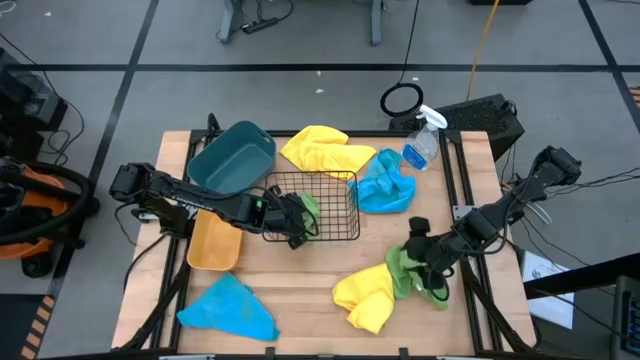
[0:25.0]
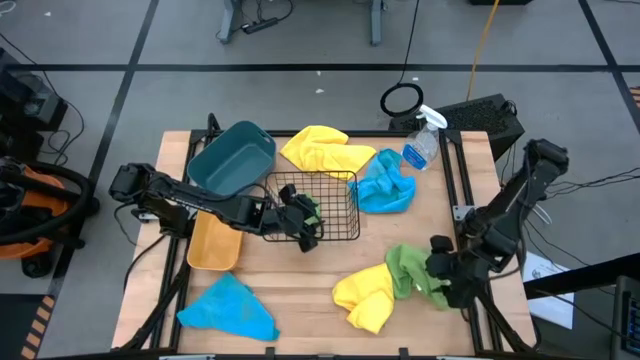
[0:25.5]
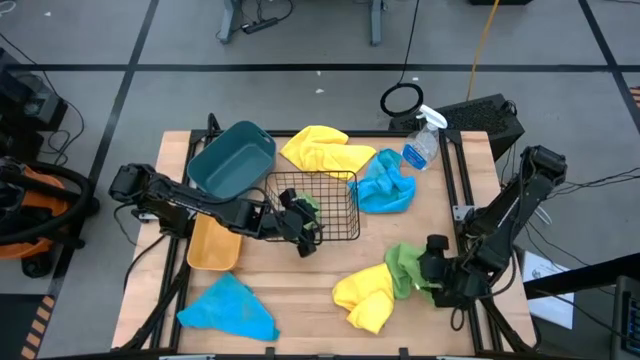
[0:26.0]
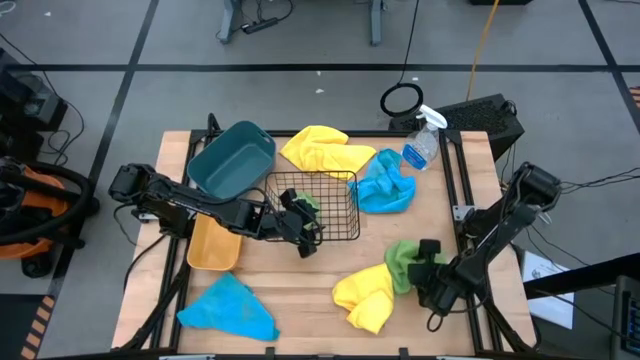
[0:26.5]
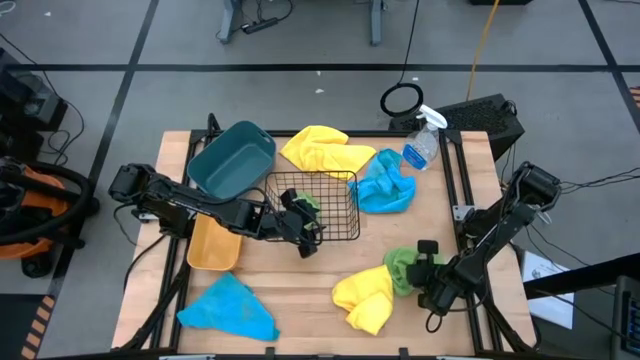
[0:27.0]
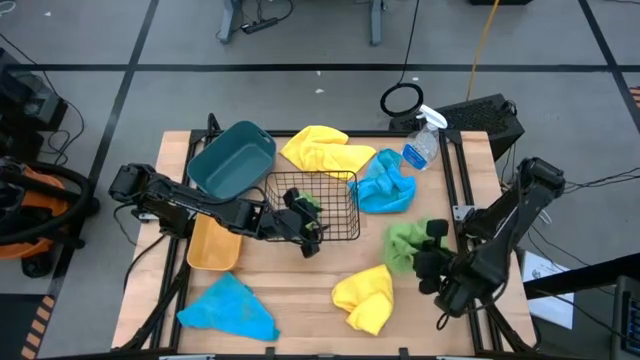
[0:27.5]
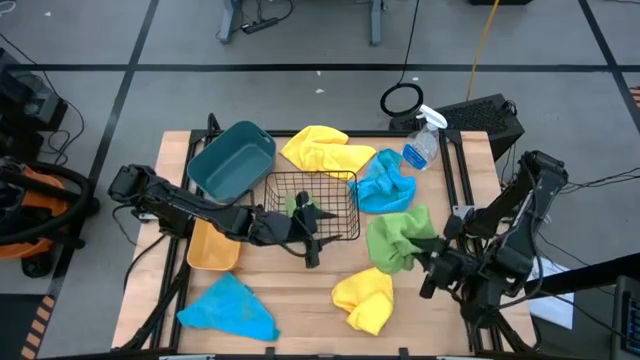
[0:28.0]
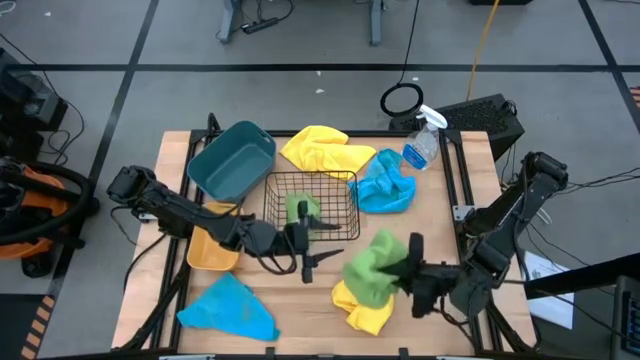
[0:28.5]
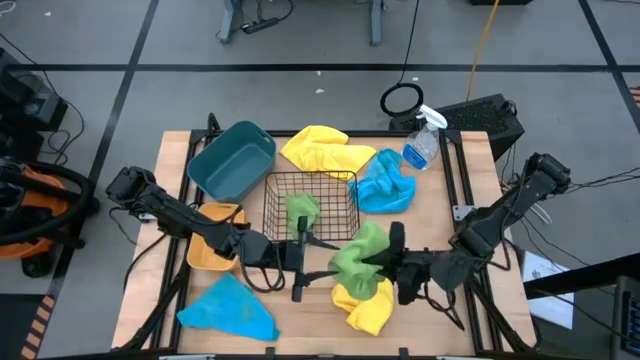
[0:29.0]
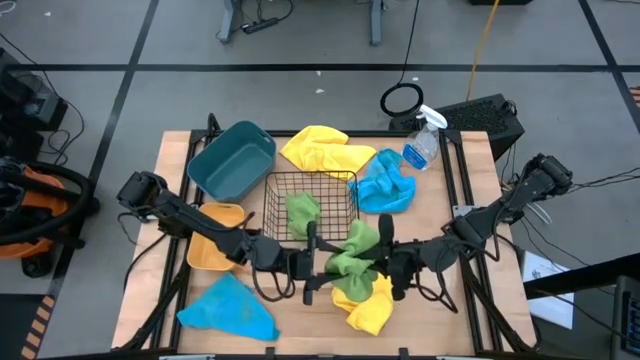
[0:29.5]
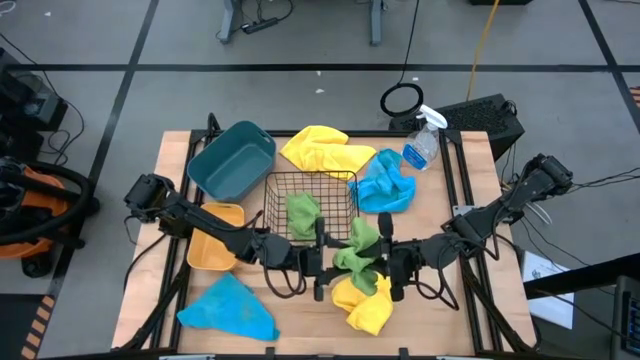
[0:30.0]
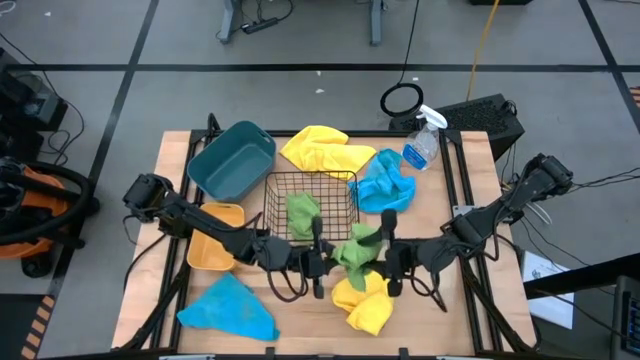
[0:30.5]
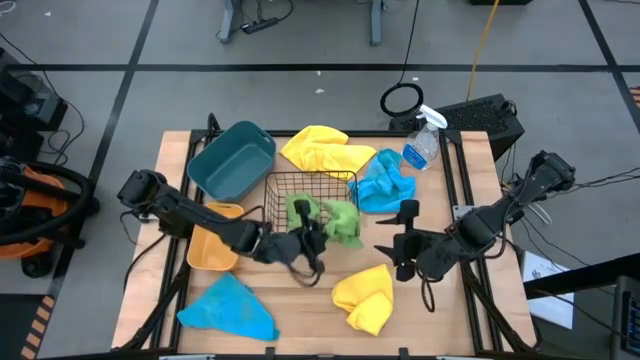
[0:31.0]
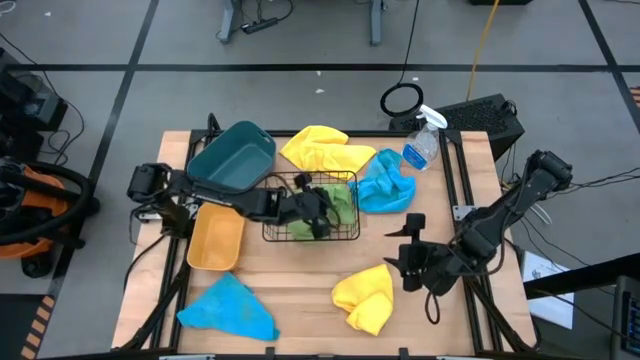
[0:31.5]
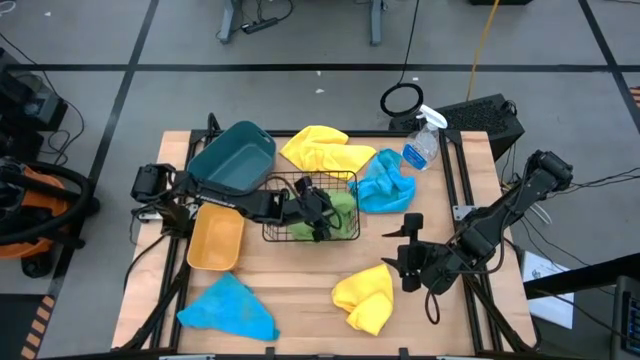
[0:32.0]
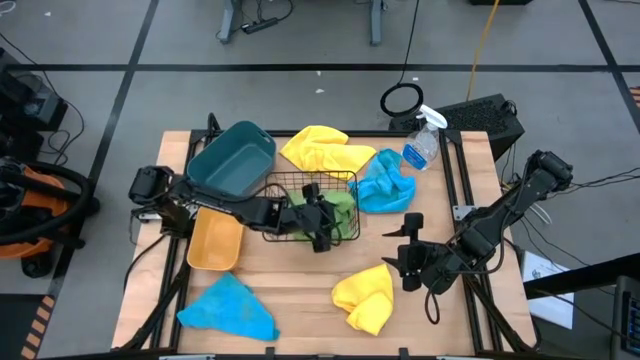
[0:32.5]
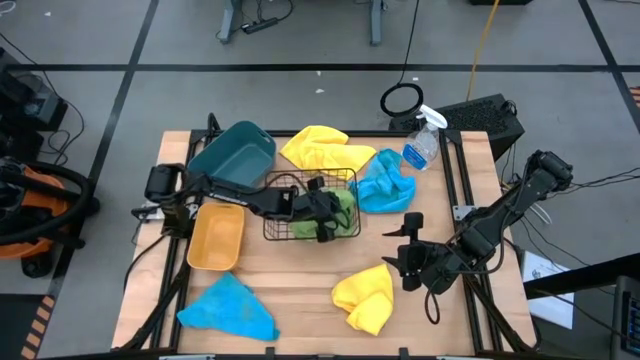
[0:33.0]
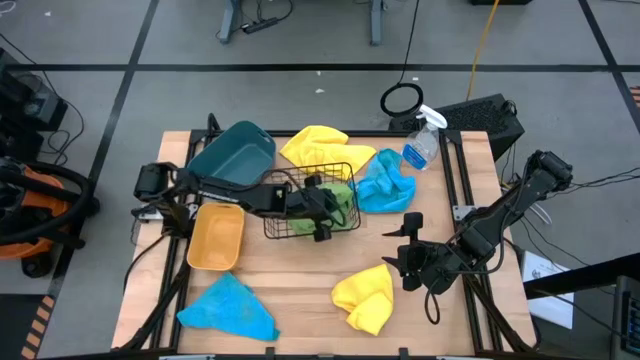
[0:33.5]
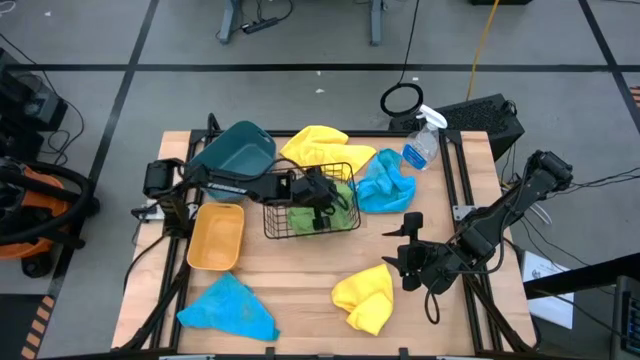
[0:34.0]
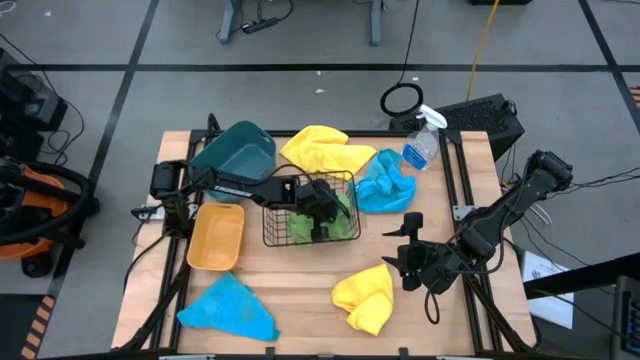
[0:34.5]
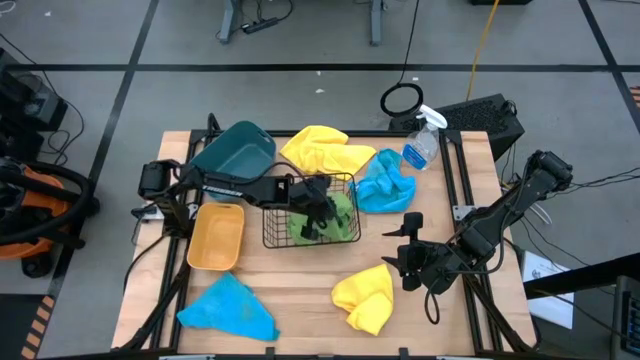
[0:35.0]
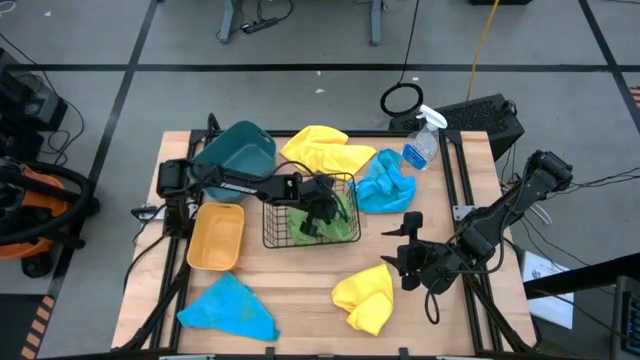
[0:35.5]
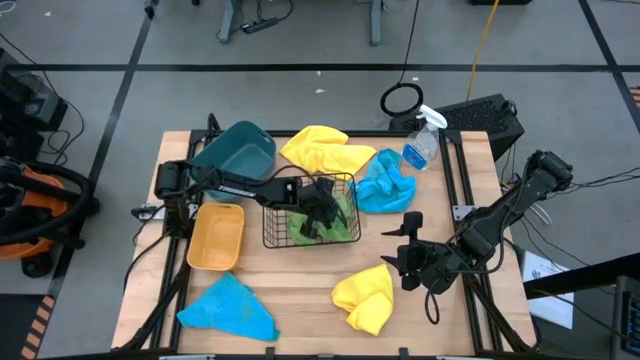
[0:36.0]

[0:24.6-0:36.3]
Task: Sort microfiber towel by color & place in baskets
Put the green microfiber towel into the black wire basket

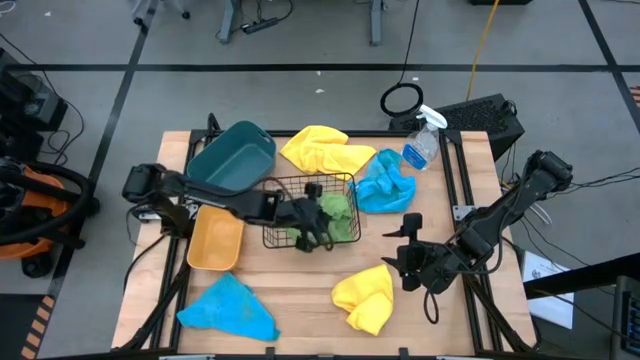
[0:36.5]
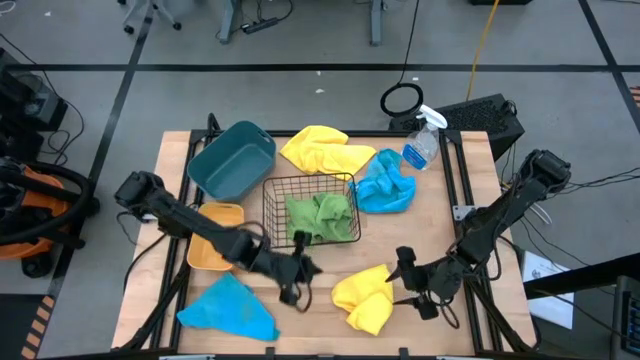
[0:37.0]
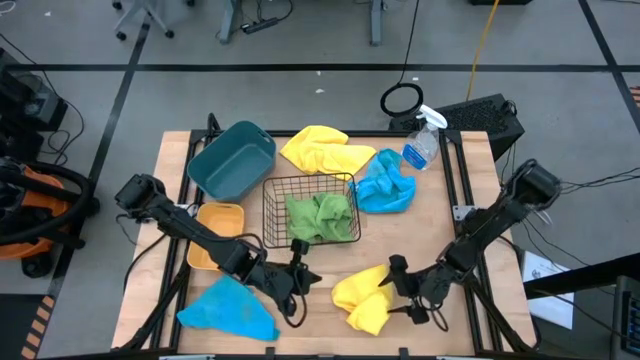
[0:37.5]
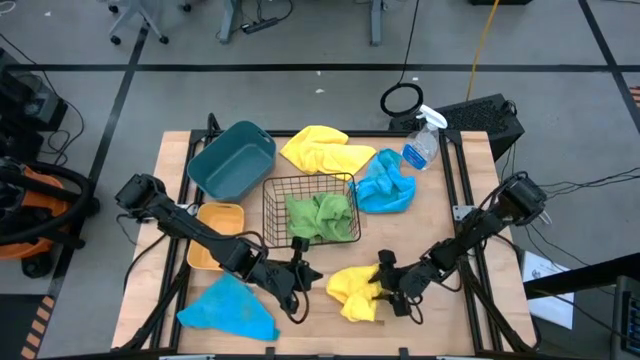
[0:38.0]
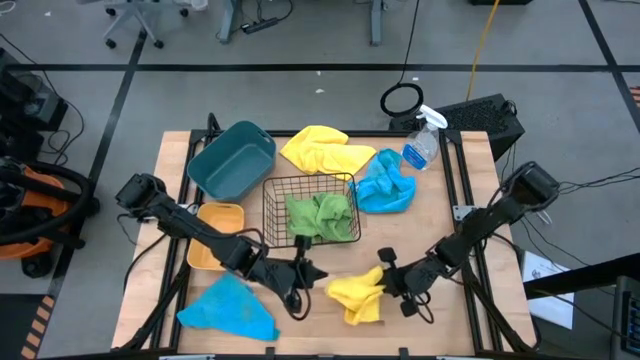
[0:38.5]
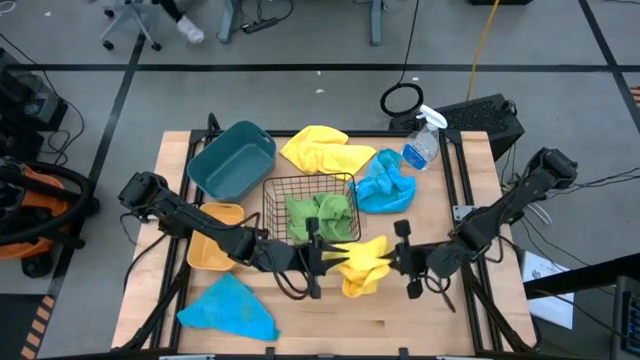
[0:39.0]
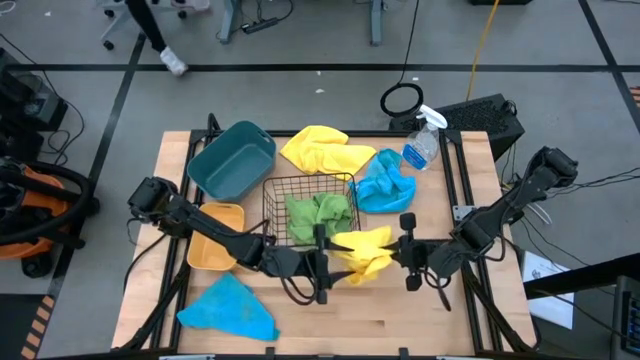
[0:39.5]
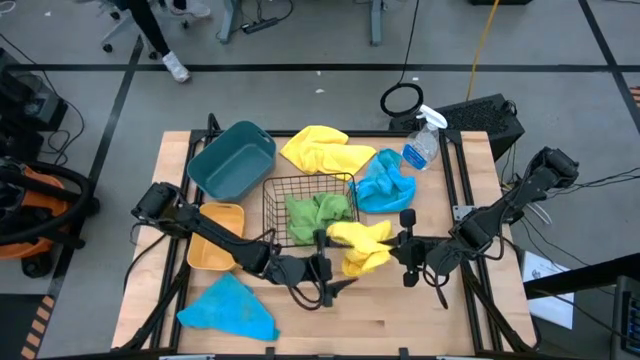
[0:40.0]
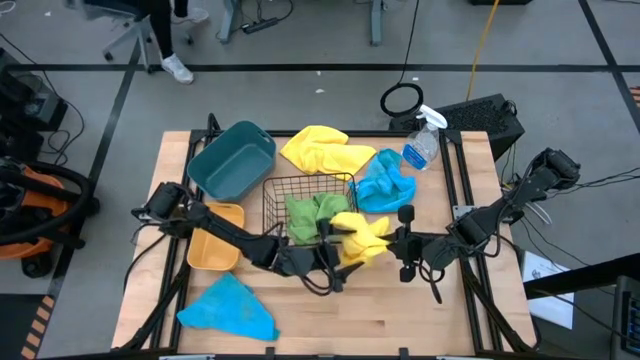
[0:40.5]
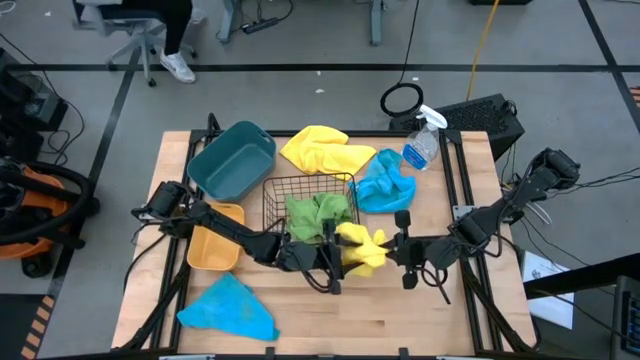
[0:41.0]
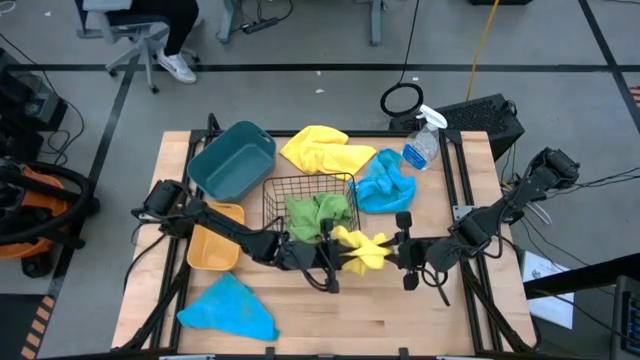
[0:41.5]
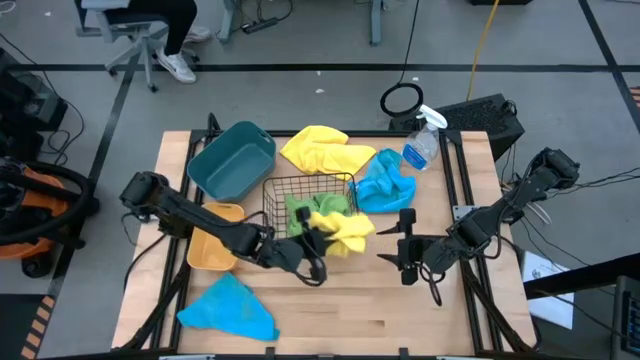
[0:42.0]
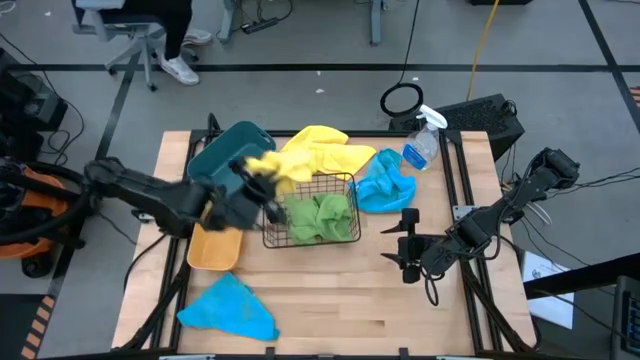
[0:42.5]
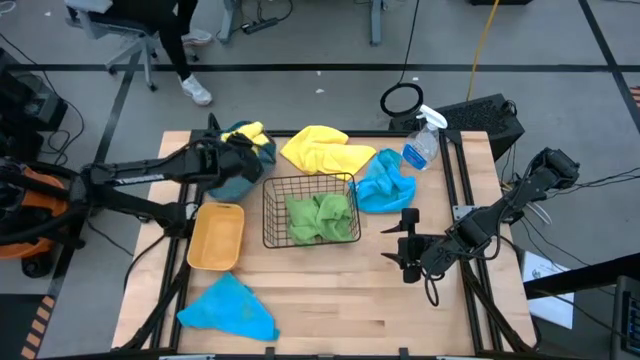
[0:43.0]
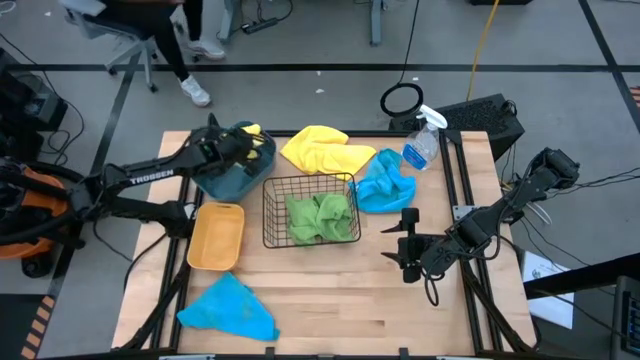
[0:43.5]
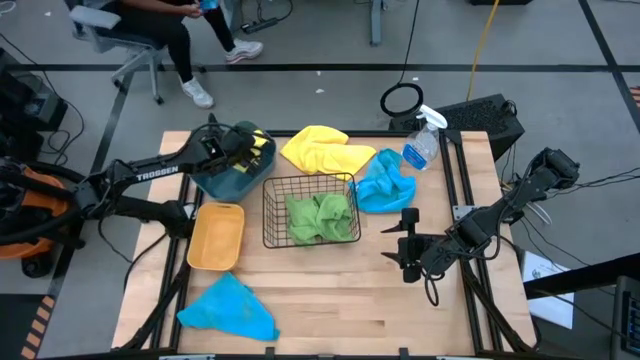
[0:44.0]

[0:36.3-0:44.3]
Put the bottom yellow microfiber towel into the blue bin

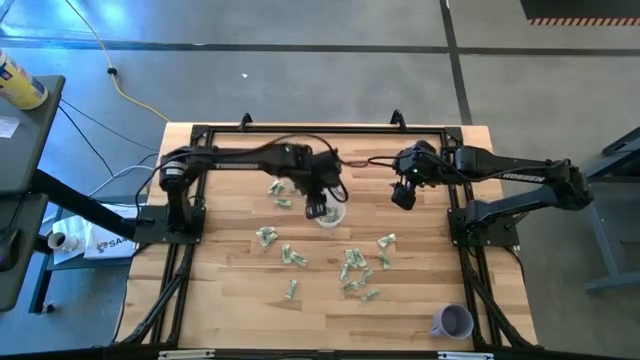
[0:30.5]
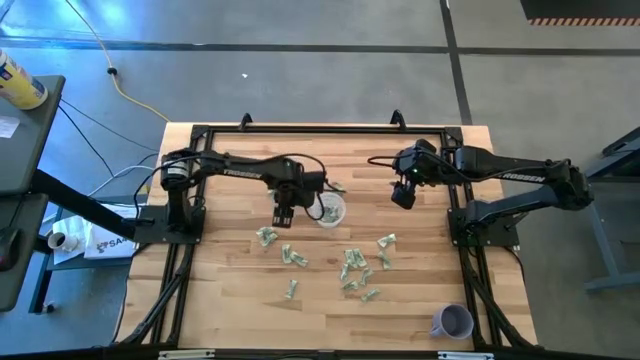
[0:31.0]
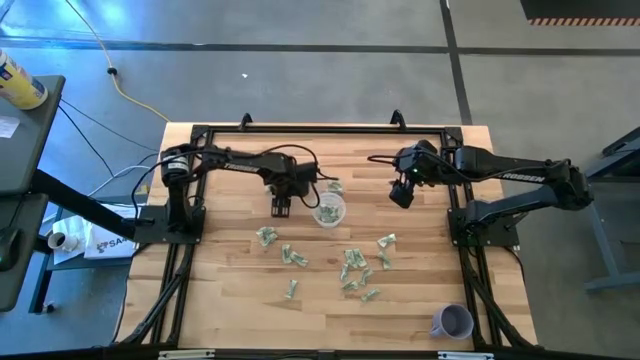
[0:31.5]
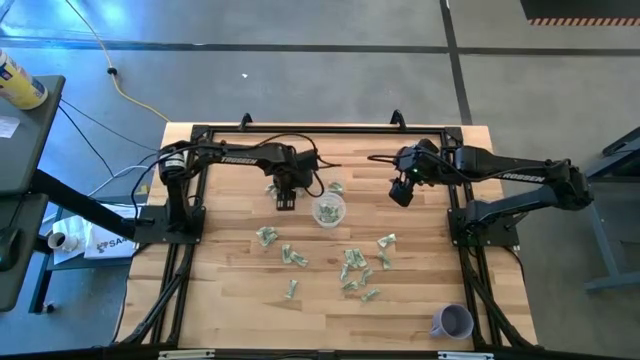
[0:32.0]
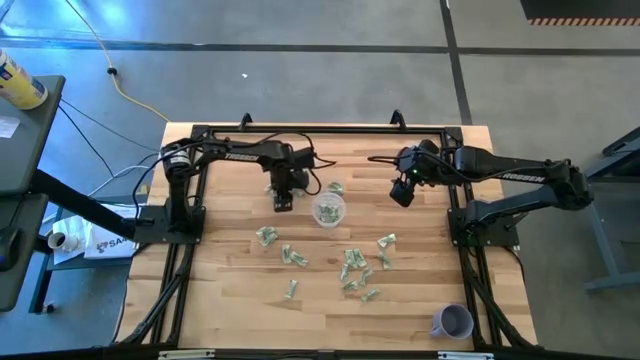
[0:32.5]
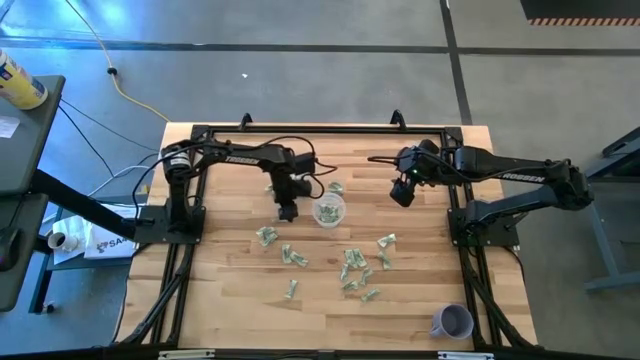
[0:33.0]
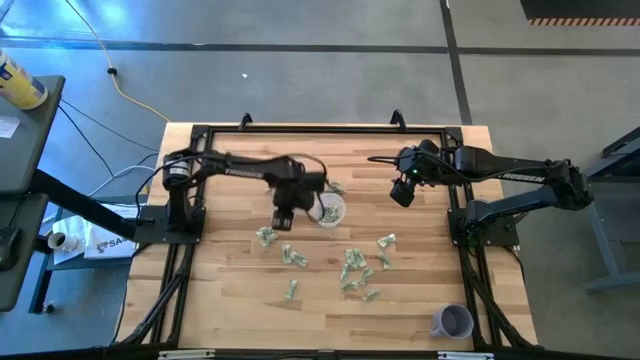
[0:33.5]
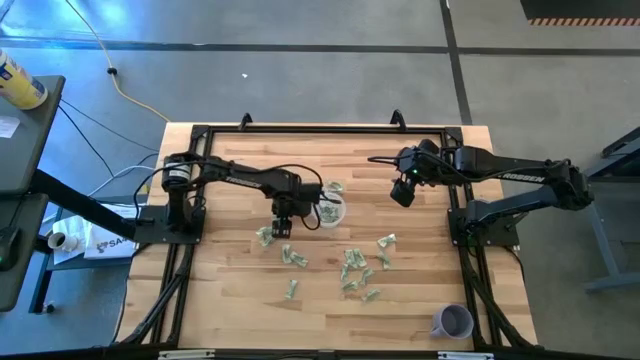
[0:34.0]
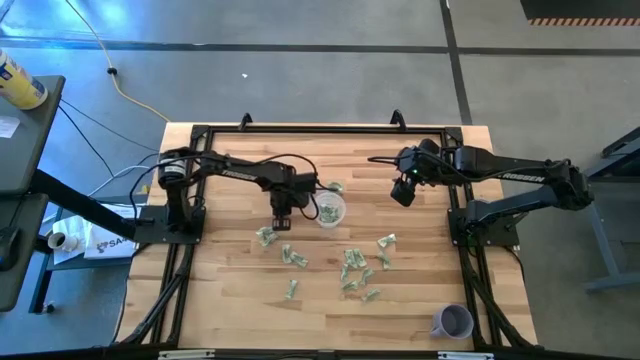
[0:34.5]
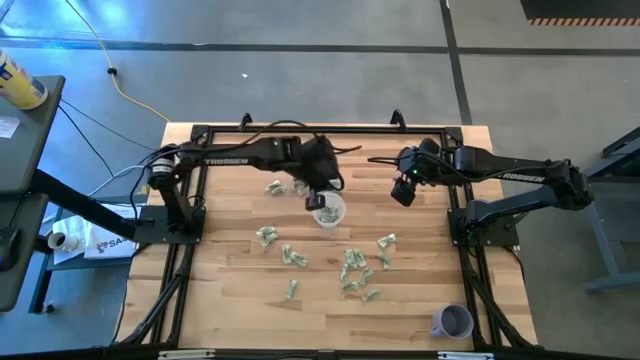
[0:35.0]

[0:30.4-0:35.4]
Task: Pick and place Stevia / Truvia into bins
Put the white stevia packet into the transparent container
